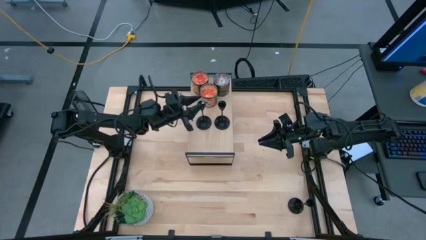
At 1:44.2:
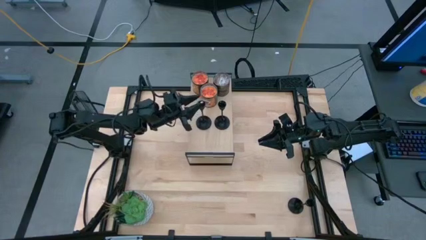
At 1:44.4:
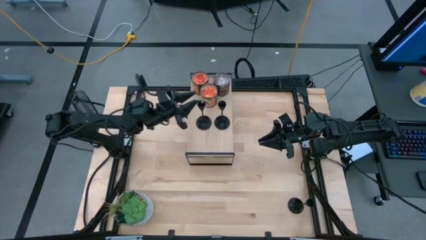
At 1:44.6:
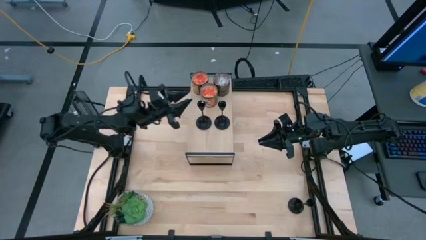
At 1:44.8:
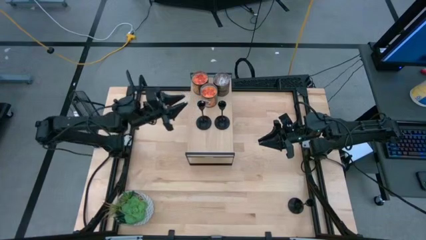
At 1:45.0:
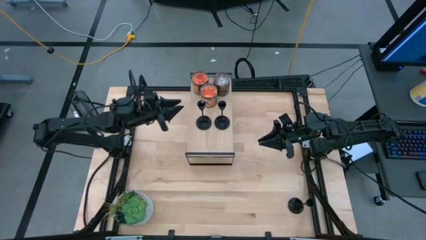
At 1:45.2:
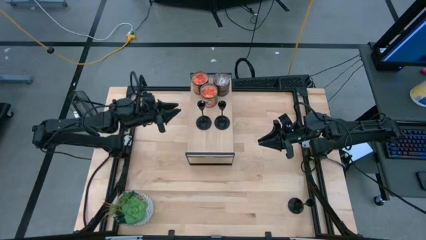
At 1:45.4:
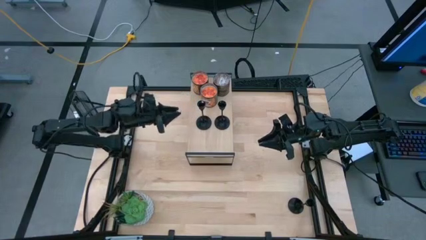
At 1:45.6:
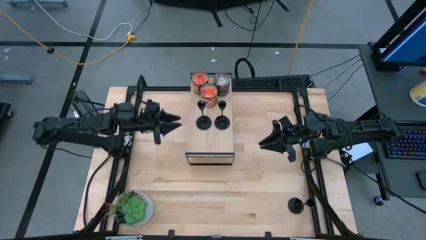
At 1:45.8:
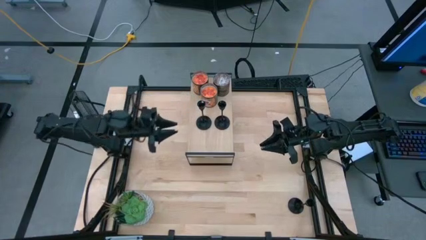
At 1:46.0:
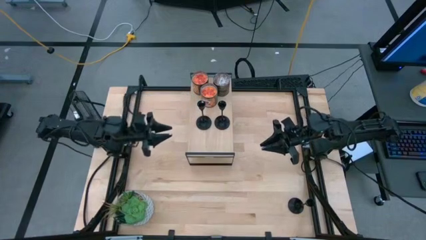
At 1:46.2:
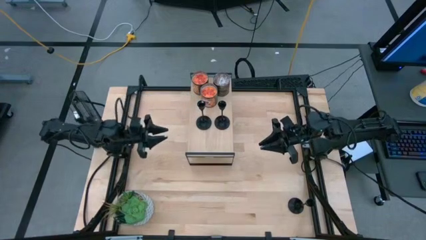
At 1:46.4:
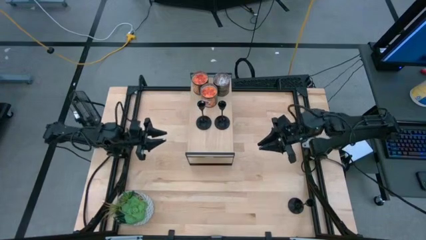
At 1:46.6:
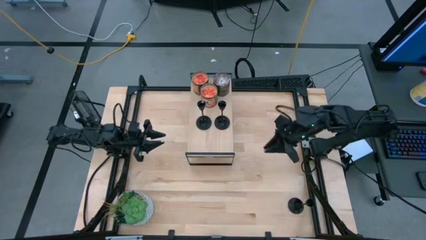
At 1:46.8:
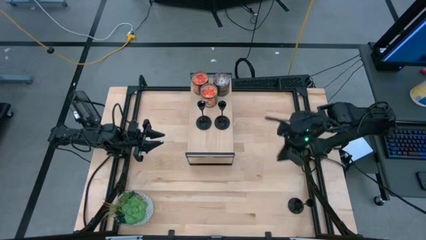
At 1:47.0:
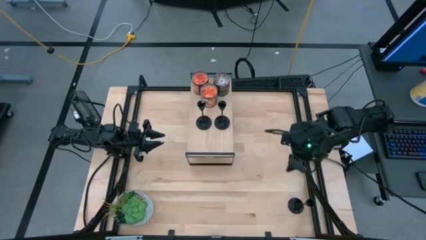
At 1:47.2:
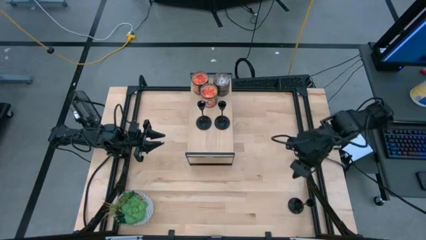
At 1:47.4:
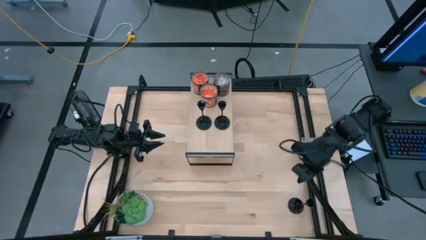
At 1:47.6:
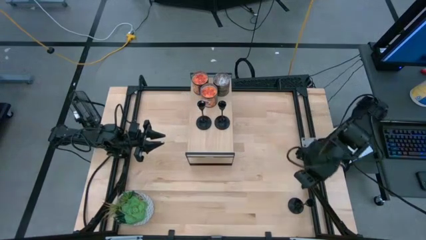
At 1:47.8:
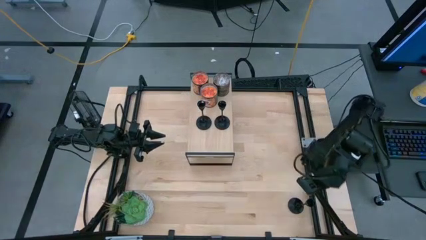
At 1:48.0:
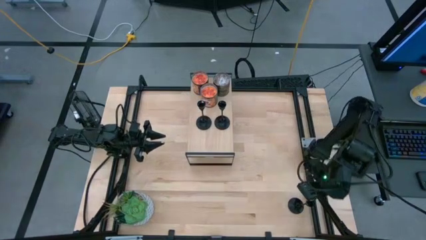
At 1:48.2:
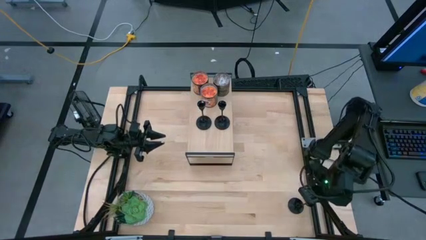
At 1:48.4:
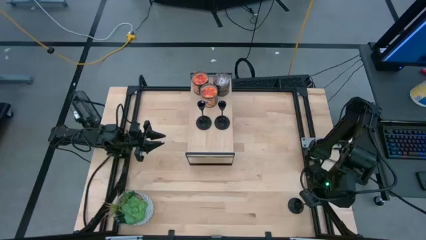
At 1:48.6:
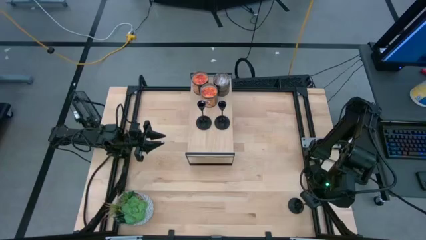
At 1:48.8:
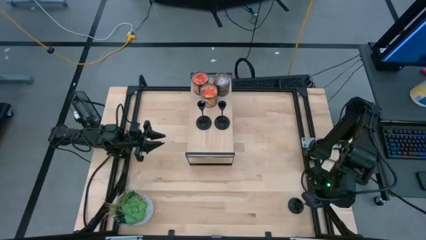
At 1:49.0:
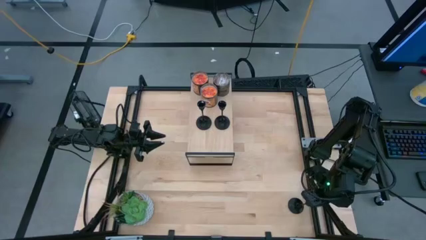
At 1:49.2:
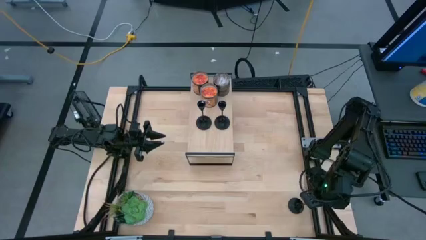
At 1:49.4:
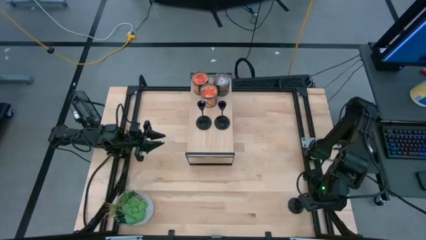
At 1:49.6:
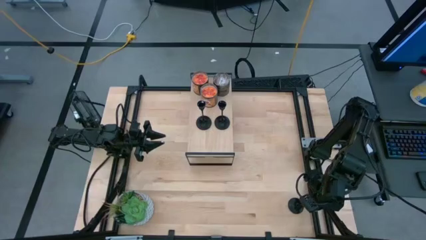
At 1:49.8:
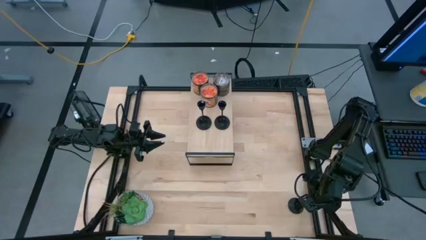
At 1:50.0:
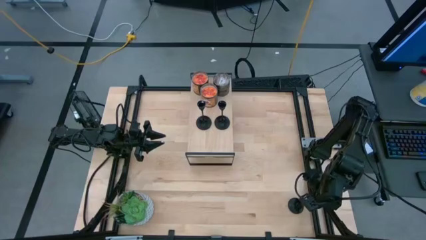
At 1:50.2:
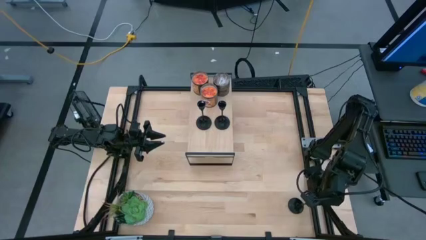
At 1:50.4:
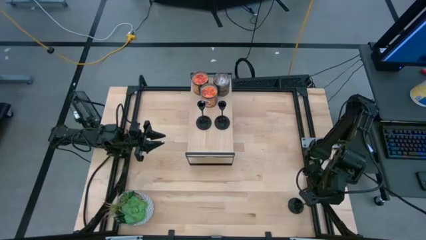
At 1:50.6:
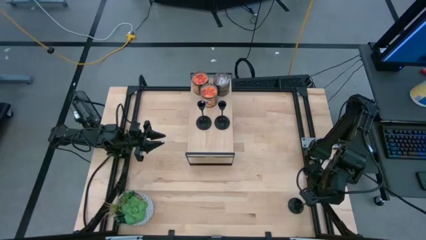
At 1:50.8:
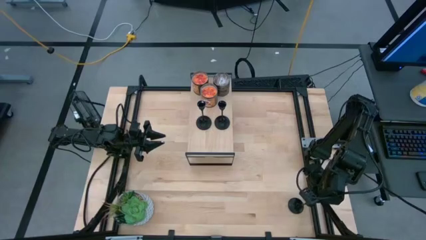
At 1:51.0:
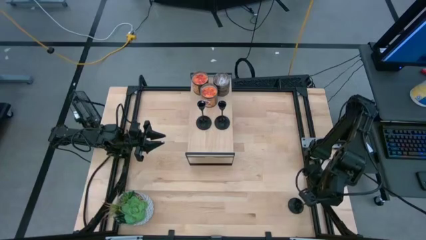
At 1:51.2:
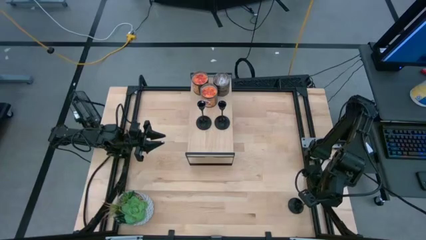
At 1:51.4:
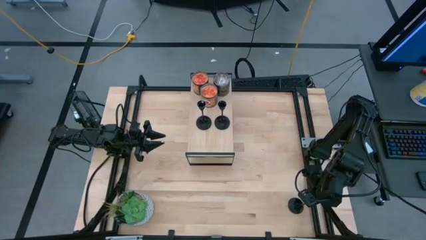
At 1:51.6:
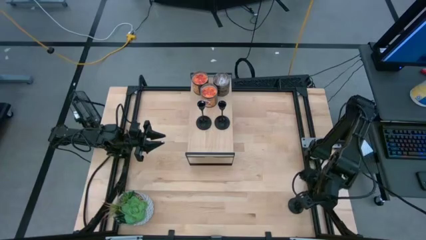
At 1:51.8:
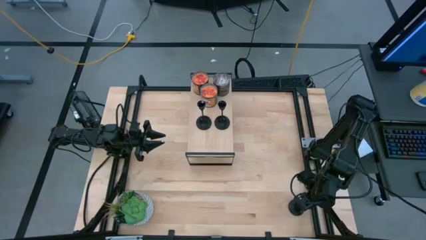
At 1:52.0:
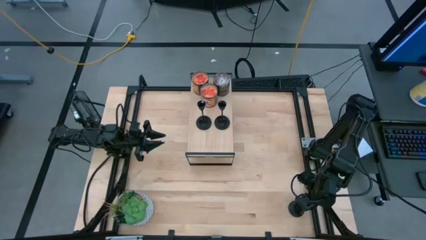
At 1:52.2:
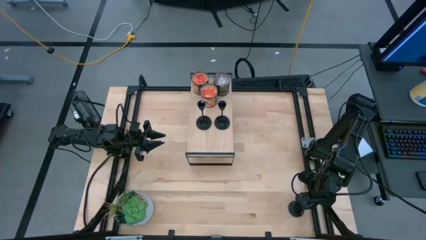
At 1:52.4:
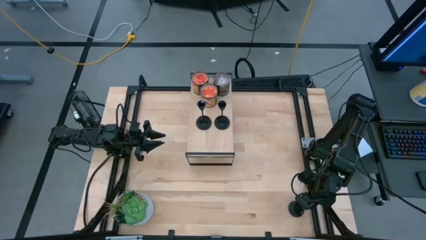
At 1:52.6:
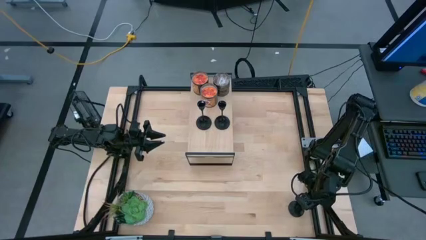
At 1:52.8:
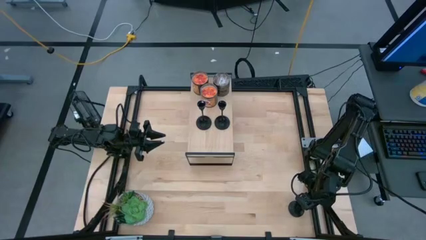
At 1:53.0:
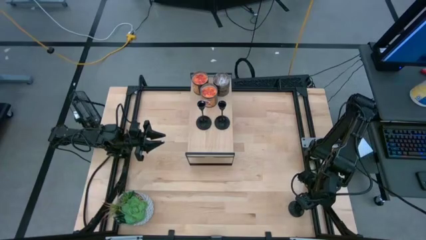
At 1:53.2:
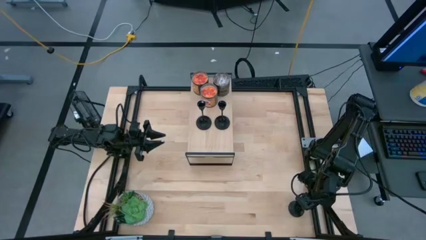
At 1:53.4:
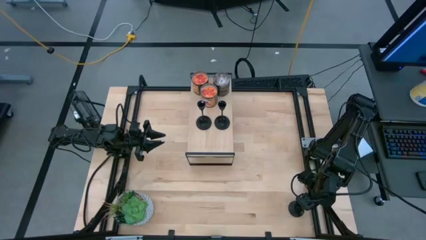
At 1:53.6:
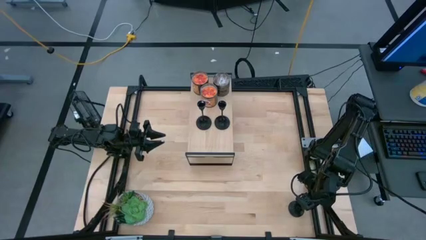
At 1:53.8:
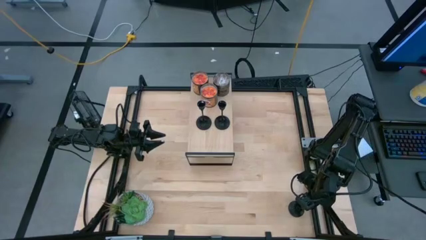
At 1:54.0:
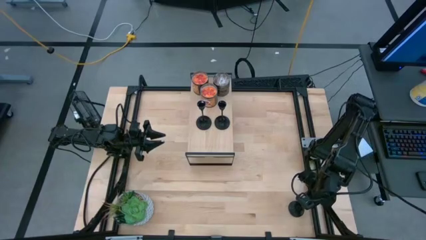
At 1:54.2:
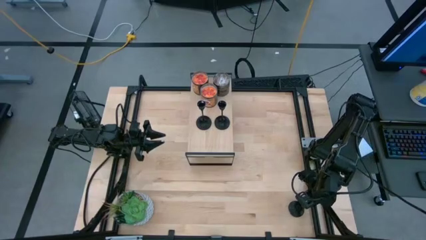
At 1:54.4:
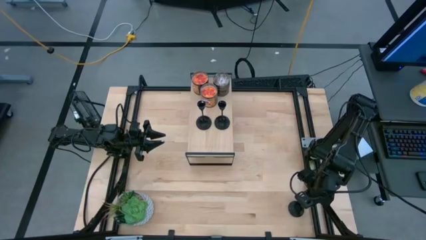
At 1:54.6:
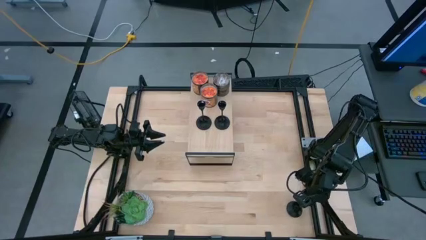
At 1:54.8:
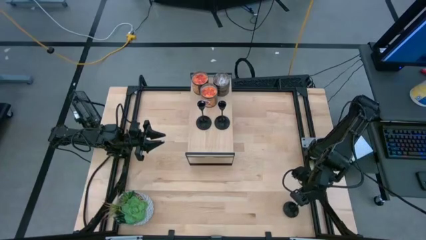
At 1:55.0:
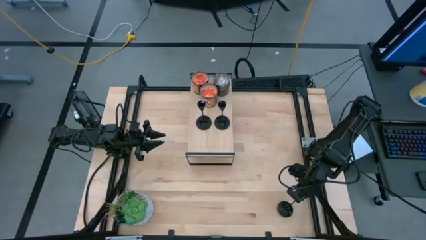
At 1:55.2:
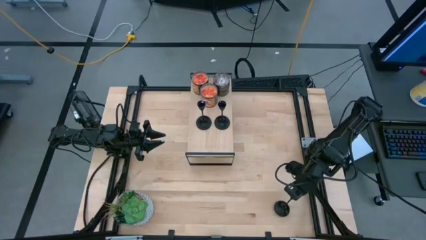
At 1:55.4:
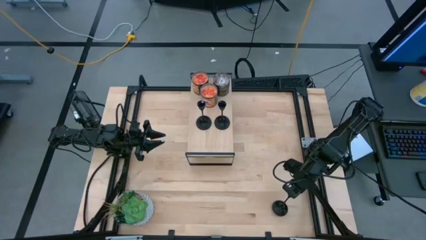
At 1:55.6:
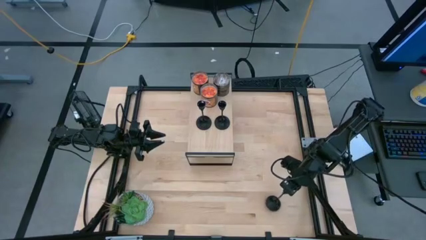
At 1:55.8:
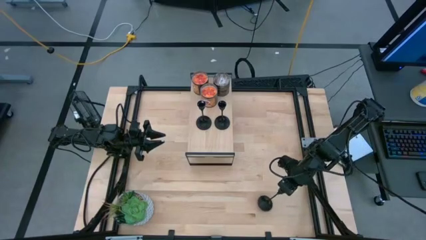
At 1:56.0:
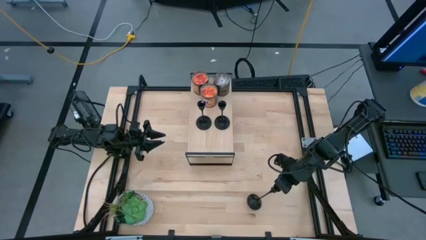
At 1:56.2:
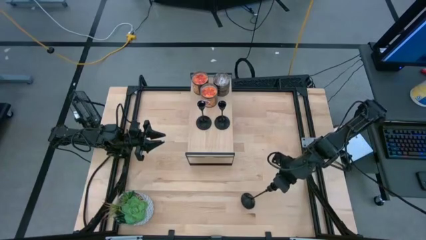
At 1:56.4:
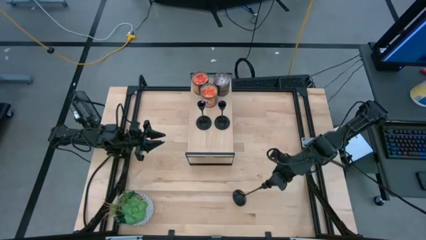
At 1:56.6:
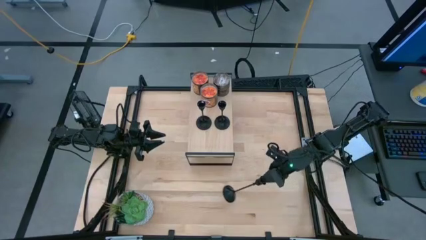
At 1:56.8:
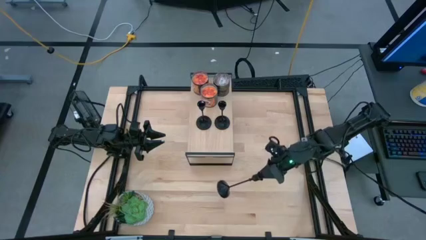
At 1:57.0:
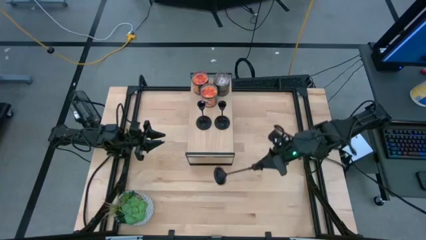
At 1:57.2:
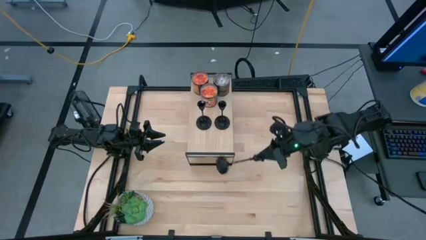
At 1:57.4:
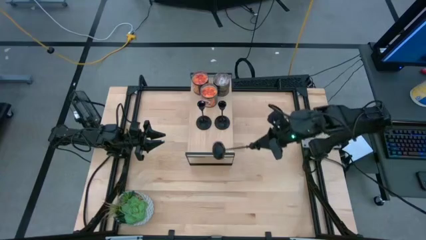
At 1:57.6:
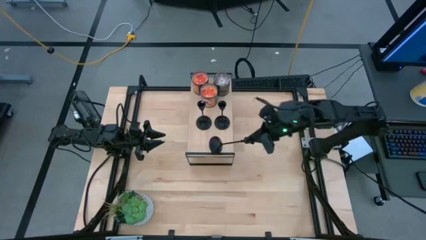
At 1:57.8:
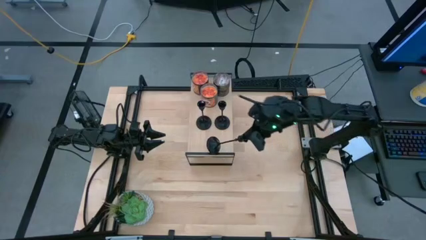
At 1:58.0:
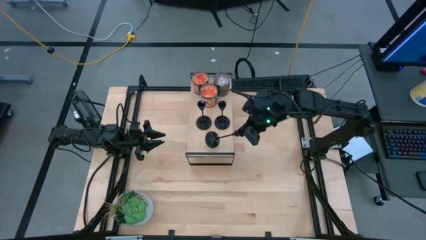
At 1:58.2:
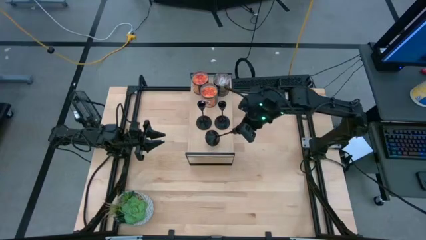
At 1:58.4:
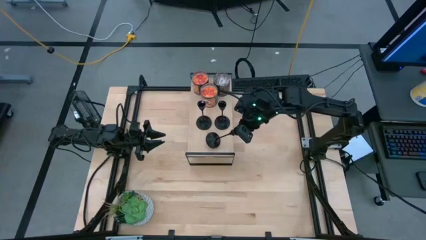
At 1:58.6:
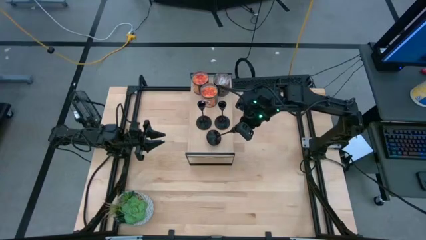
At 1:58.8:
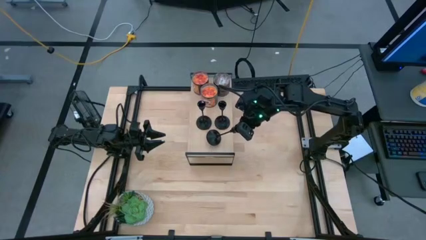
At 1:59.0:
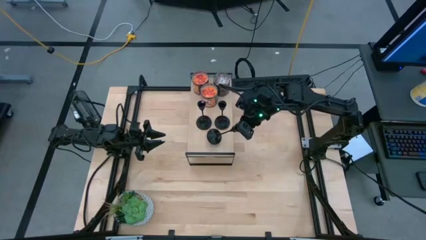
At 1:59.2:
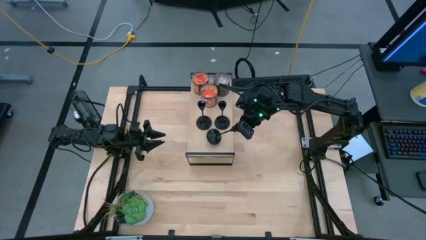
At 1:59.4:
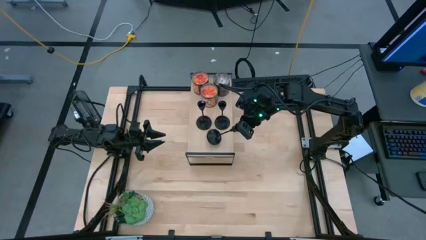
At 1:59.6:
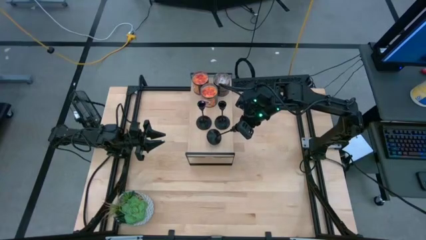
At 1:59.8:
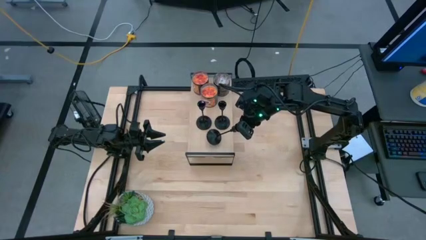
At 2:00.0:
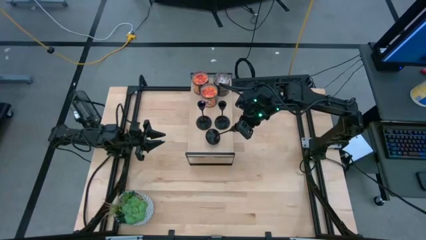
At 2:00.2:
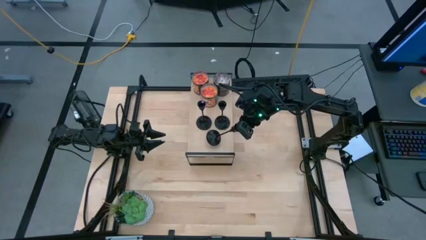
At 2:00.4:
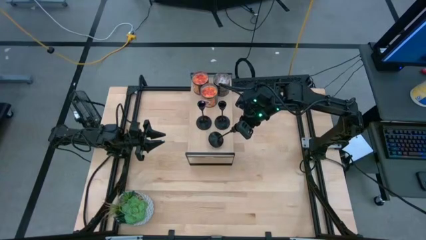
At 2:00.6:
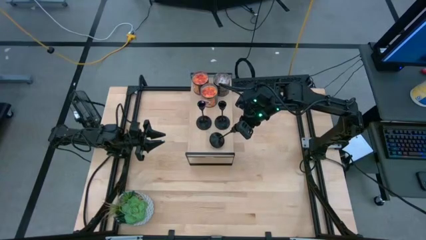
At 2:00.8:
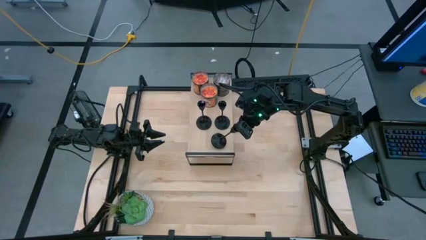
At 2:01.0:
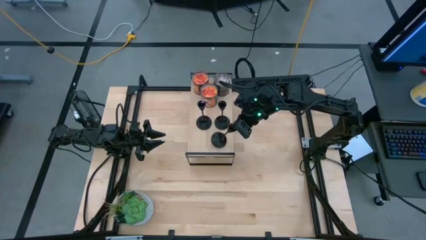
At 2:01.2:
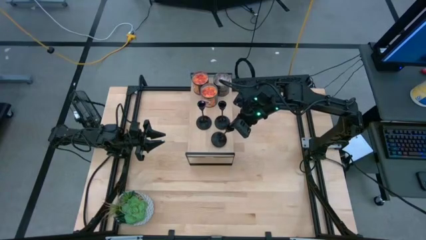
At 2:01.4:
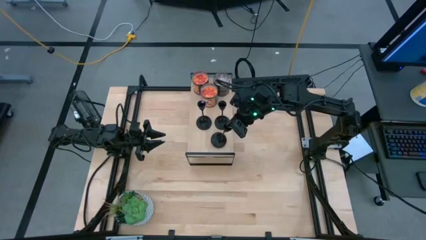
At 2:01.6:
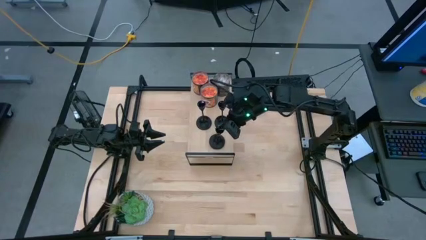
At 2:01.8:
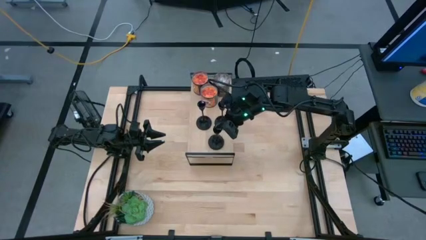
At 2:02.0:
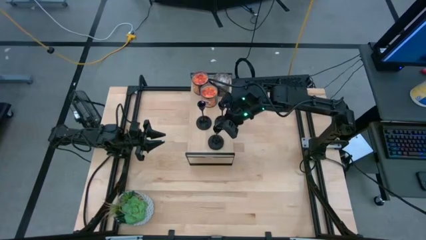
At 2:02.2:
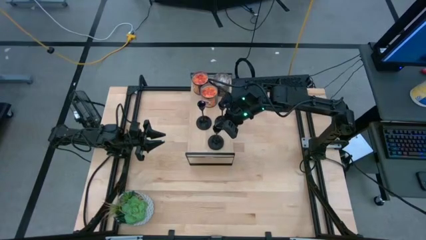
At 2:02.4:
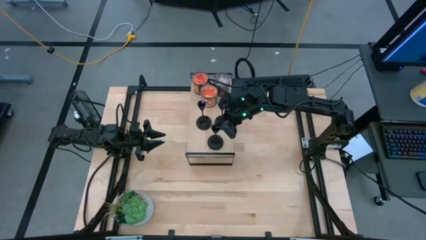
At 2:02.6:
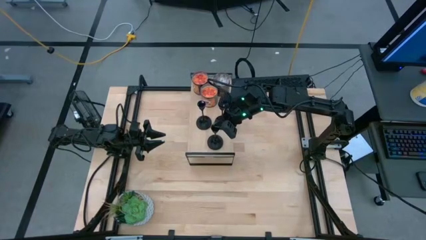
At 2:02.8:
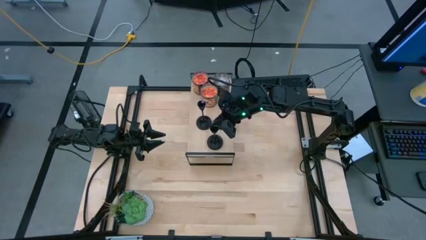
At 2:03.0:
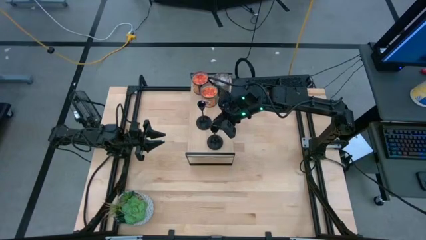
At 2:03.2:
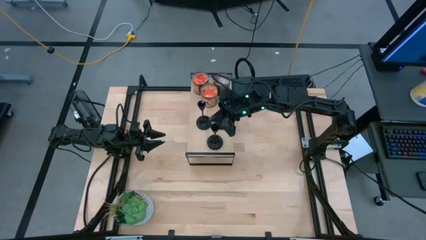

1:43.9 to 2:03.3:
Task: Pick & Place candle stick holders
Put the black candle holder on the shelf
